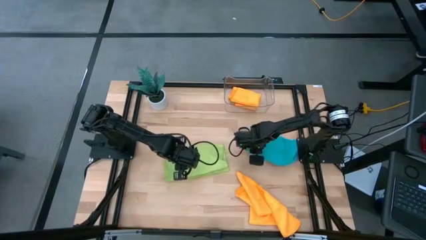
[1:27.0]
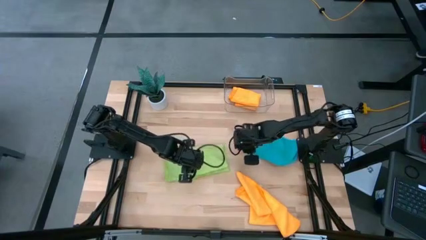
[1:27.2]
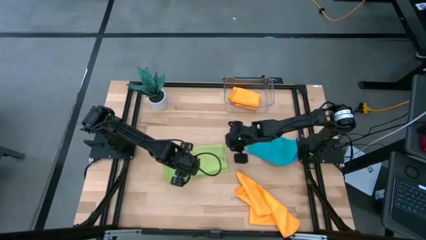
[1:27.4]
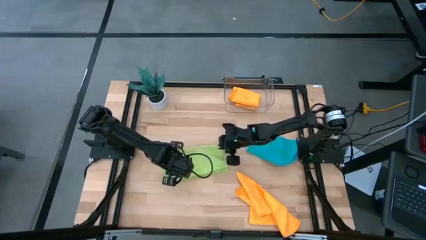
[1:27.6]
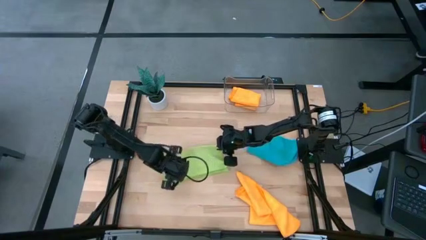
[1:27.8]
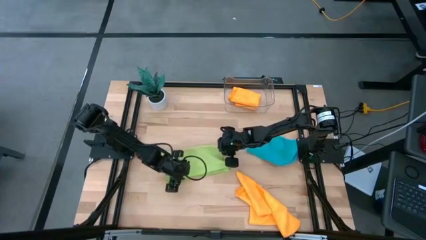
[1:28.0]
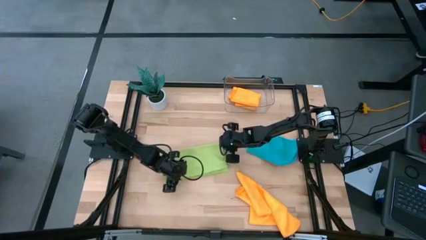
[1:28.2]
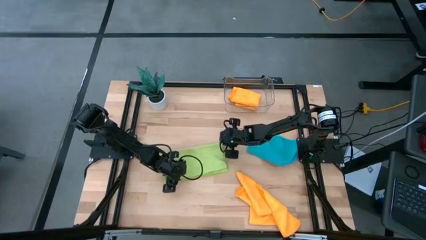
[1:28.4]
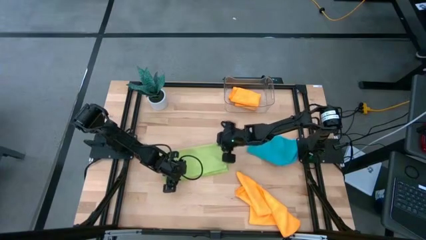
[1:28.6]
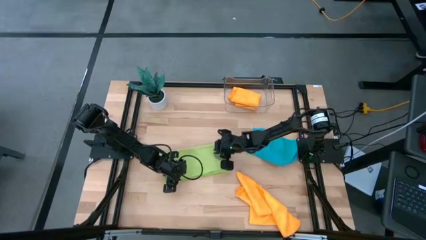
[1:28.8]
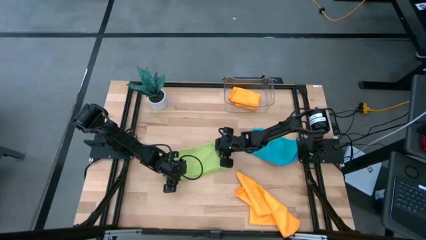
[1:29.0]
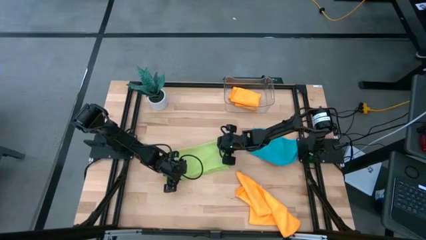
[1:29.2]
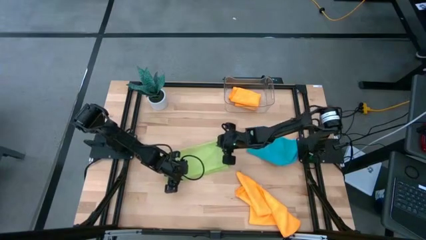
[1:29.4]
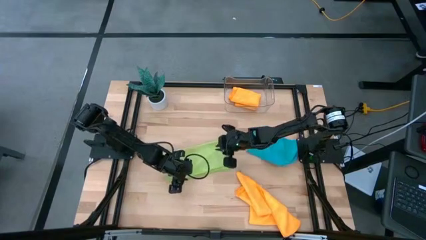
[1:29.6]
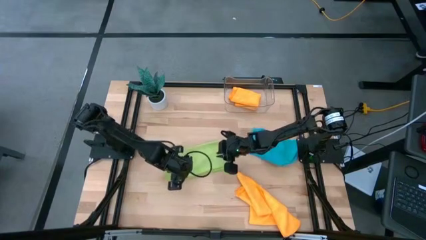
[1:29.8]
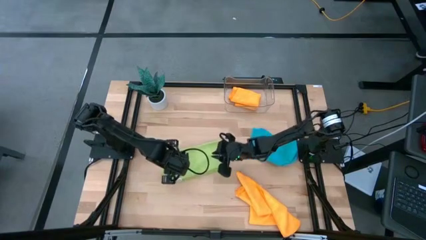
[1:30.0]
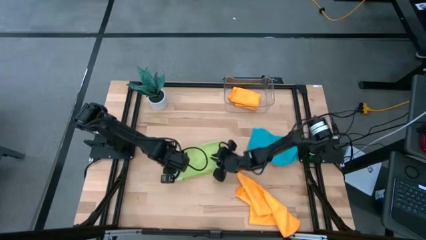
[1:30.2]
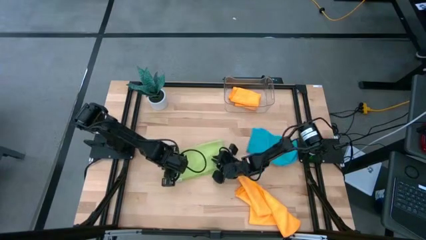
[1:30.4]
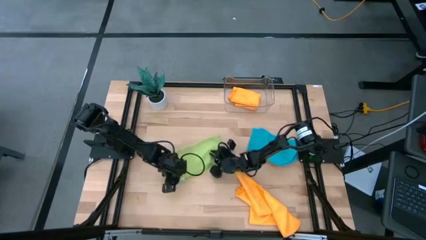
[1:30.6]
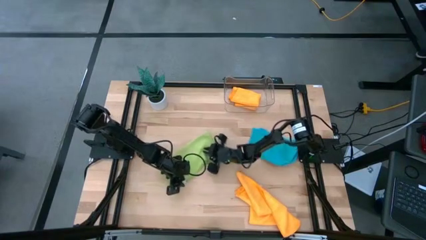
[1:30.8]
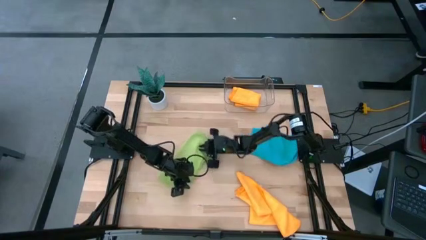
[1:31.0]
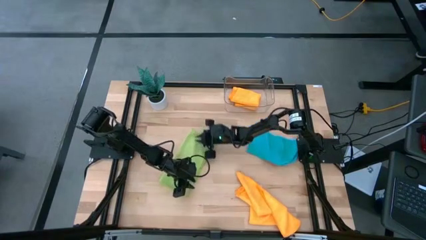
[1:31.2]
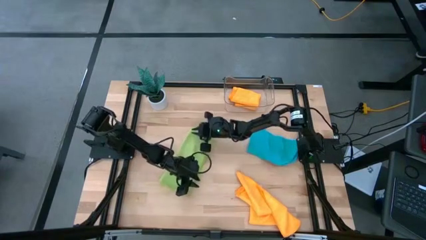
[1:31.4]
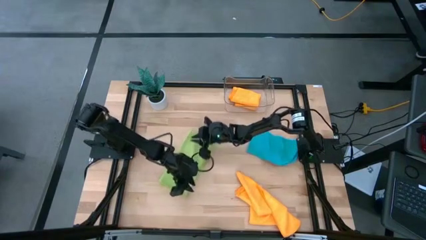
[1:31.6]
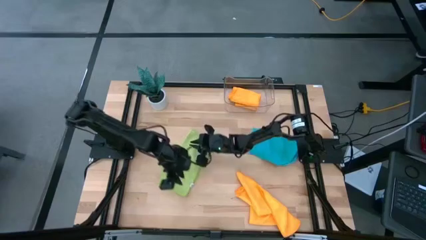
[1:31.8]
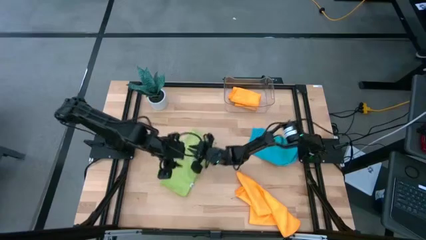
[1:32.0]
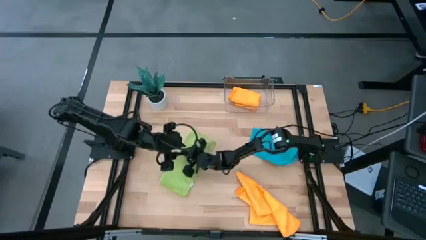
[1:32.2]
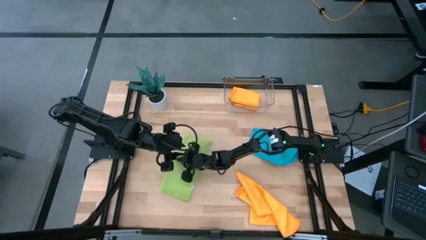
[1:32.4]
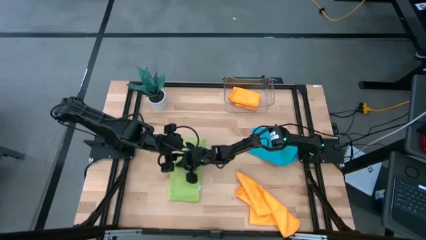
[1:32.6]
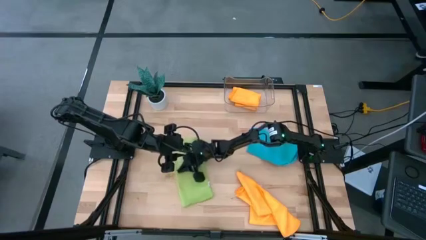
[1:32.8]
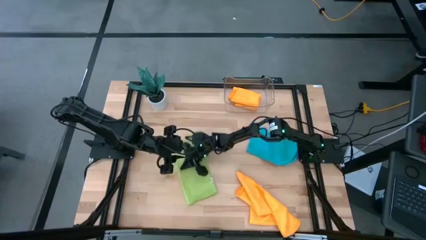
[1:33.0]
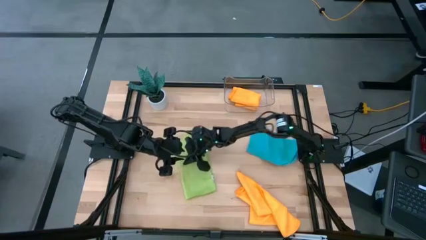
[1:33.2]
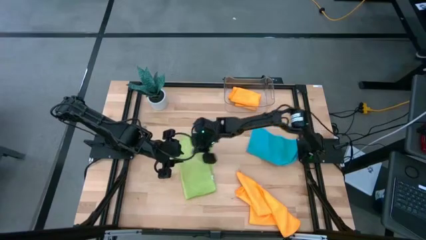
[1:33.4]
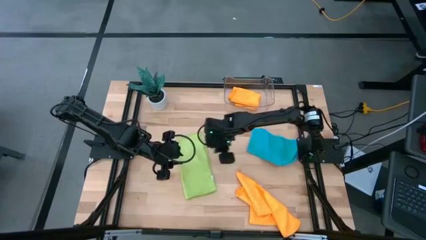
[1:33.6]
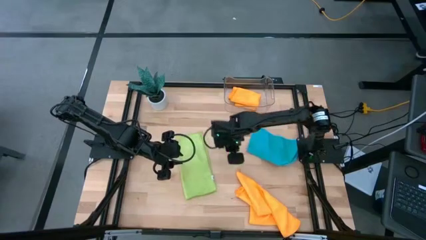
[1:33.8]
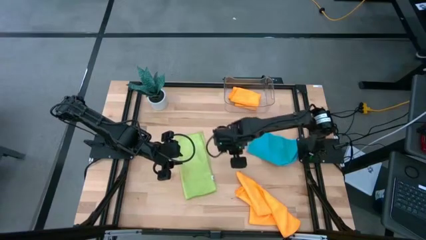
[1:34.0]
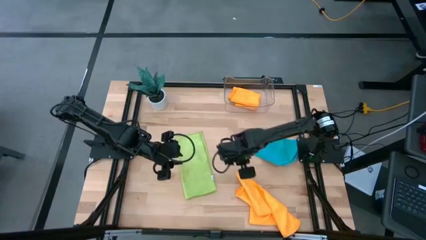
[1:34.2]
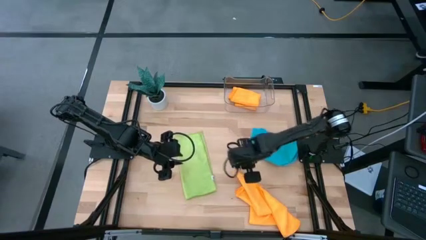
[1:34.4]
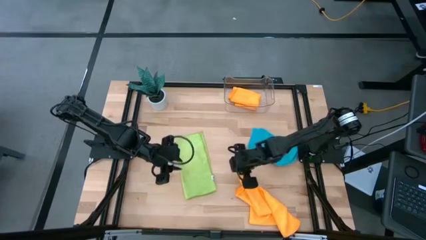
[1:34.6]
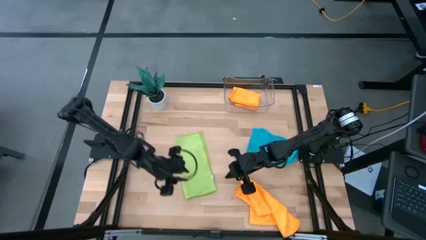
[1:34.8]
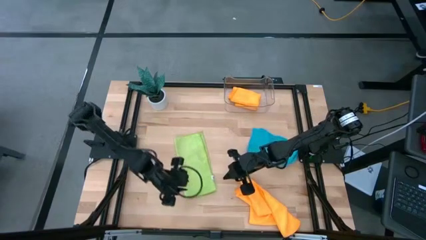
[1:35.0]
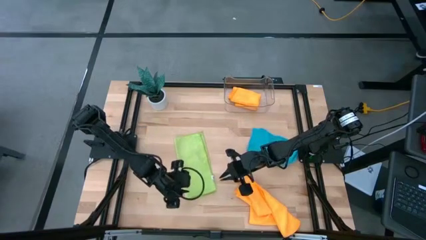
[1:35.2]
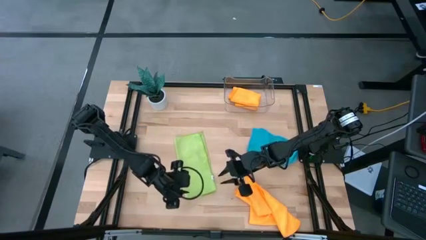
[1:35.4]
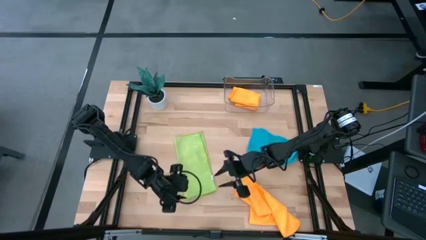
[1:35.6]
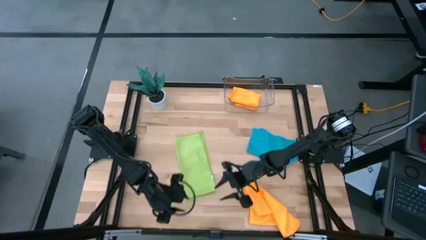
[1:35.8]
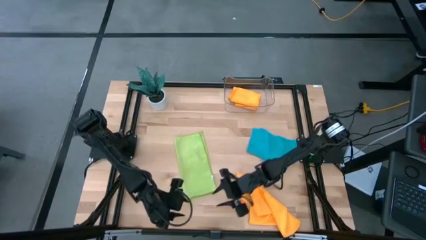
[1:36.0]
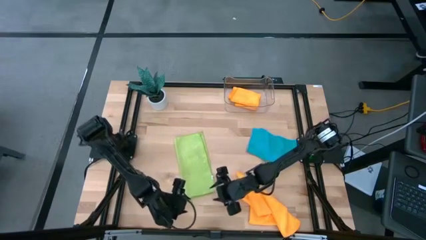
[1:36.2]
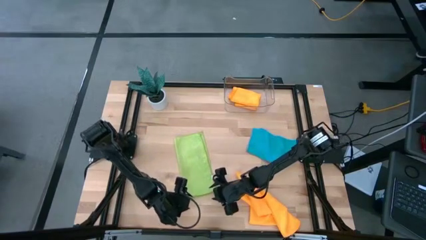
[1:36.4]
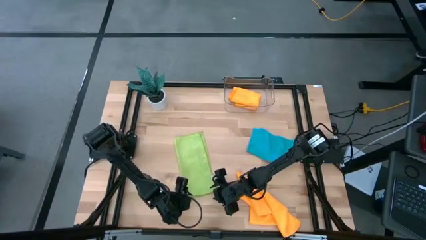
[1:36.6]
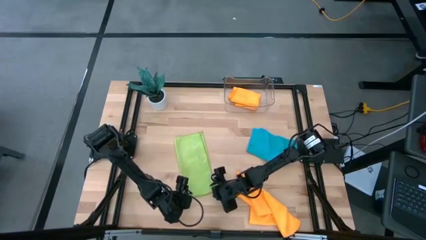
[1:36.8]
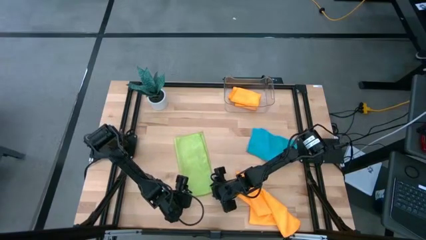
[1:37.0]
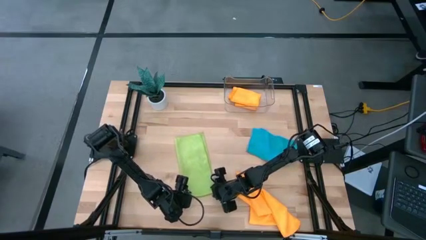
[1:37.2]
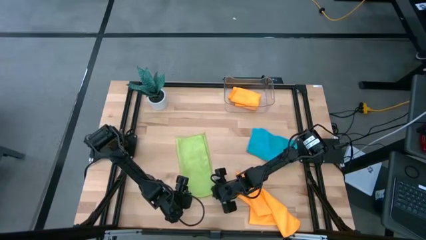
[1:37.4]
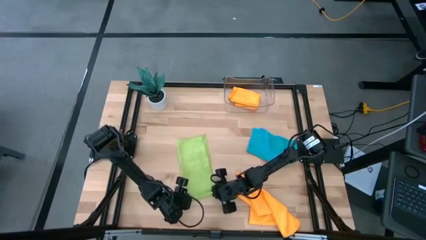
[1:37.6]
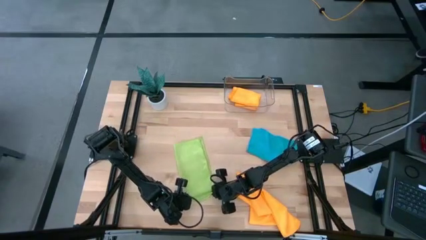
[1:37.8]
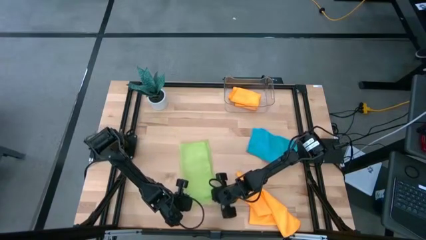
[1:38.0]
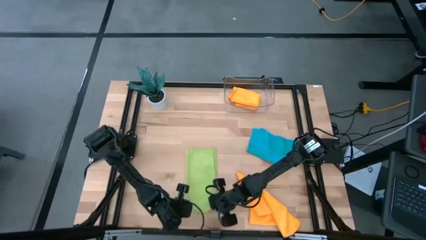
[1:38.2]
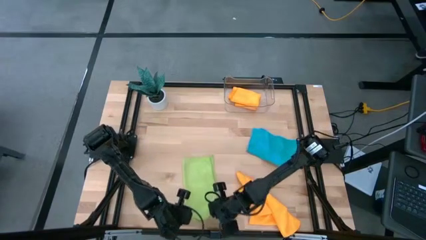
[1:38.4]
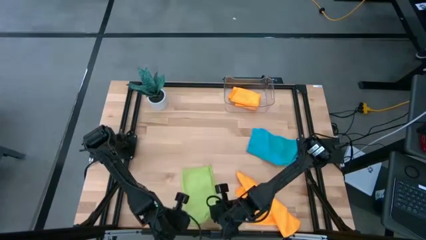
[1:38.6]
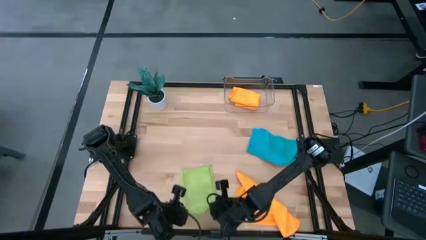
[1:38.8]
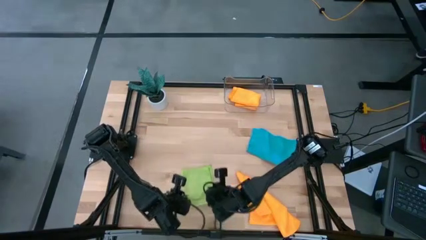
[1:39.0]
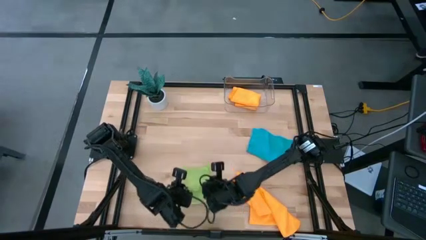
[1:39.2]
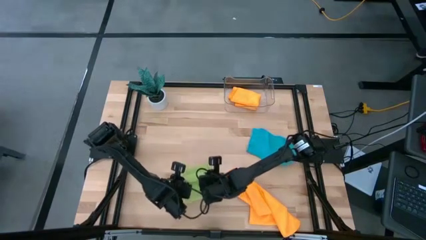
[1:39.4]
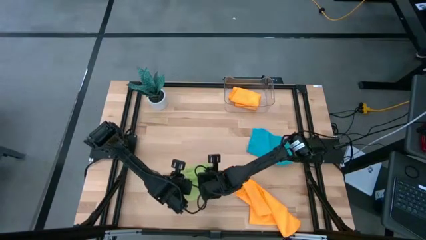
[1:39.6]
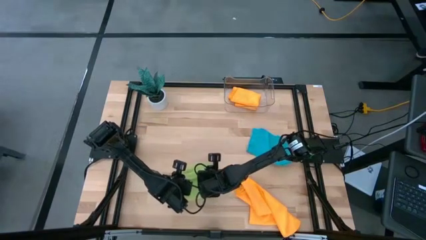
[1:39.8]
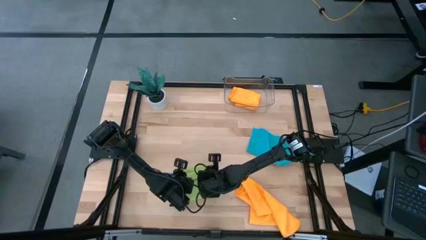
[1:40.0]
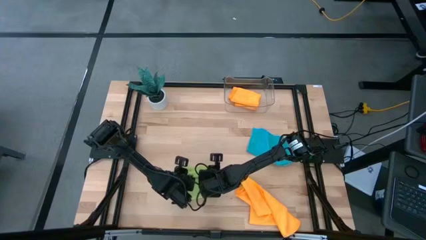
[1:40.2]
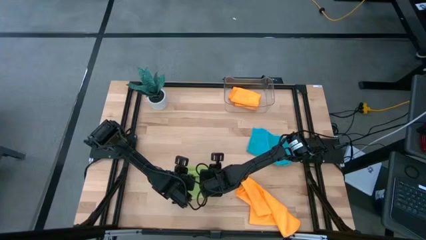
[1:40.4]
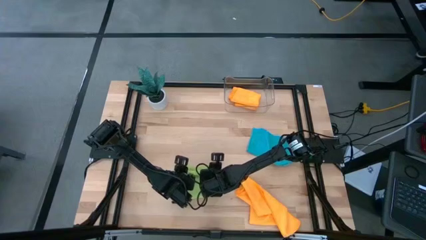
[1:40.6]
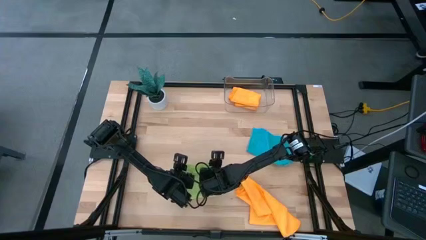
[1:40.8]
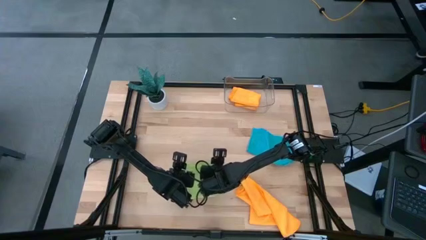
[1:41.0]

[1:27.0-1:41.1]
Task: Fold microfiber towels
Fold the green microfiber towel
